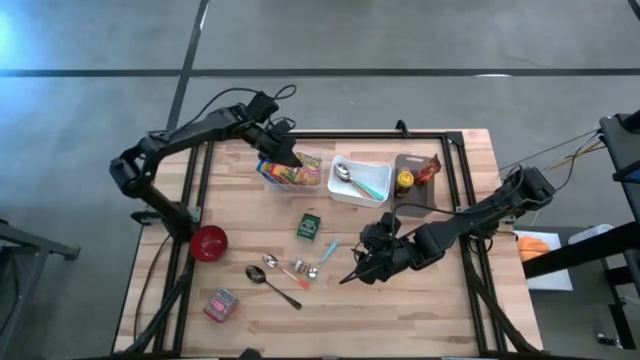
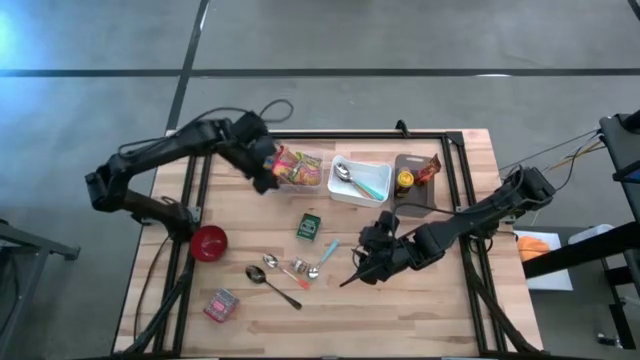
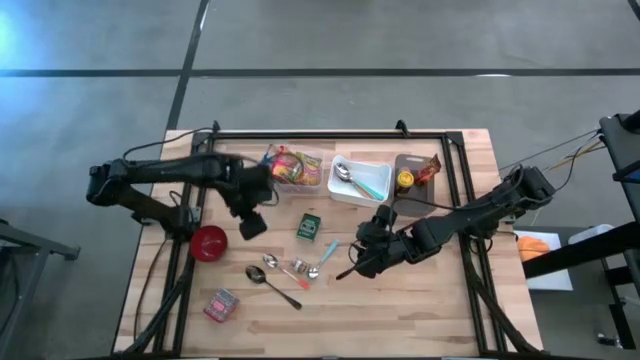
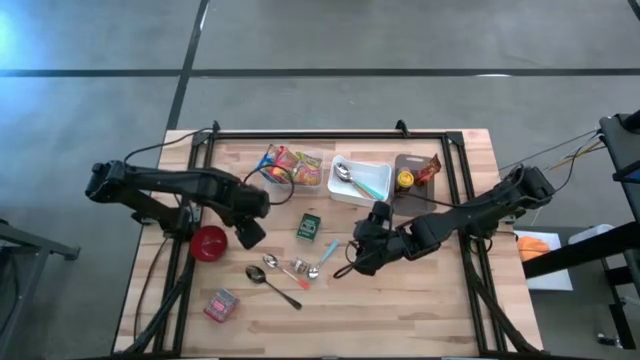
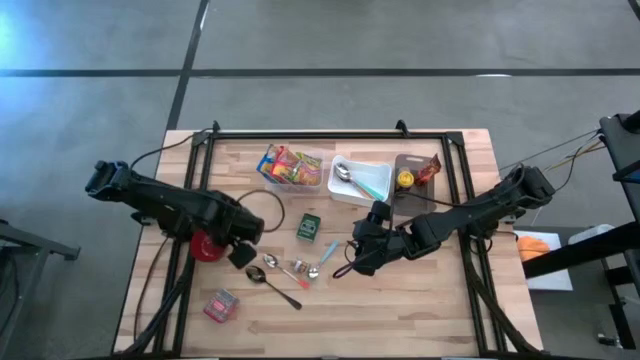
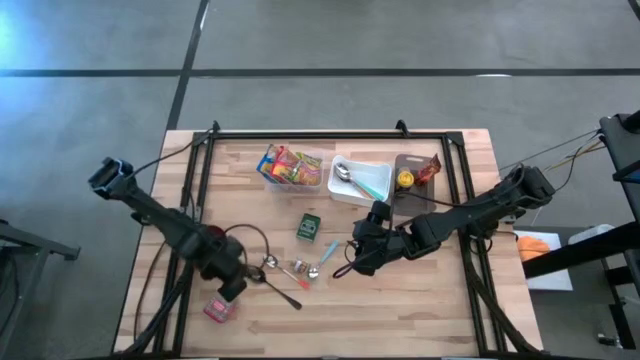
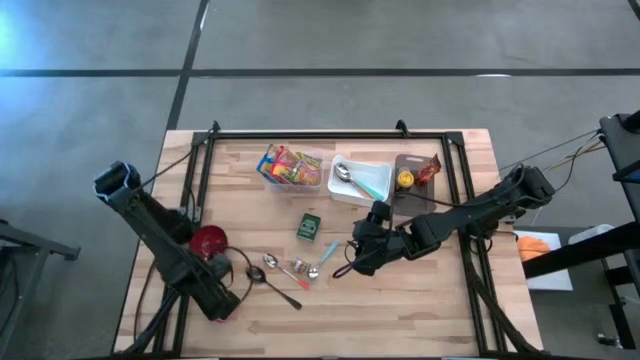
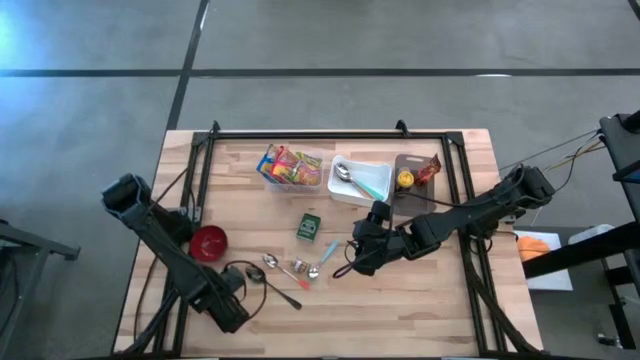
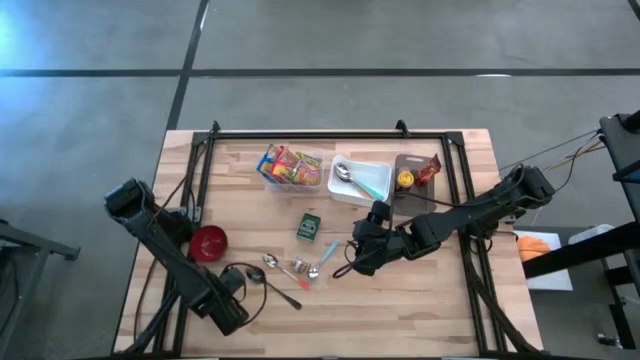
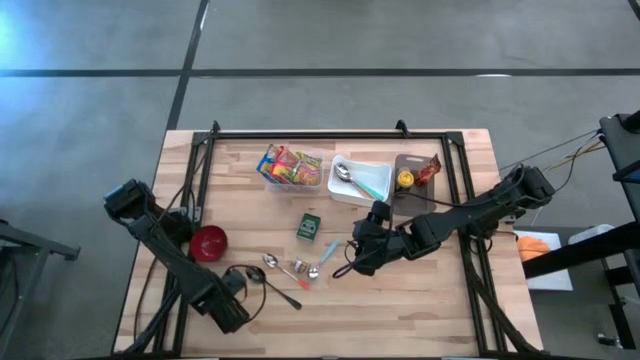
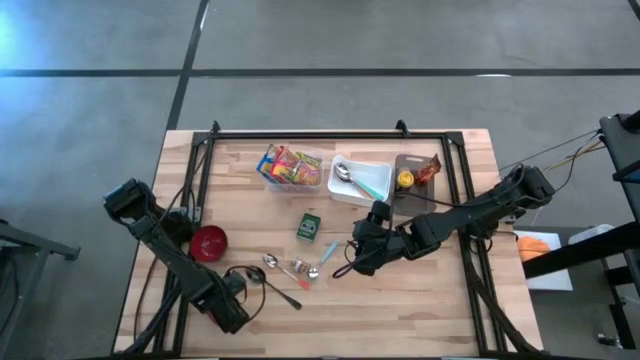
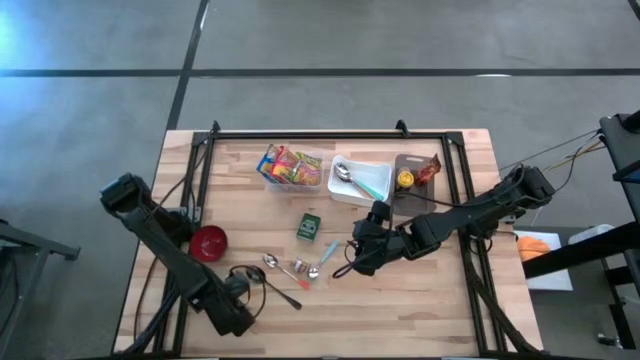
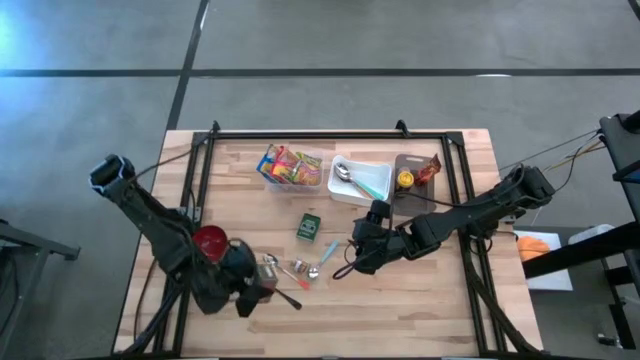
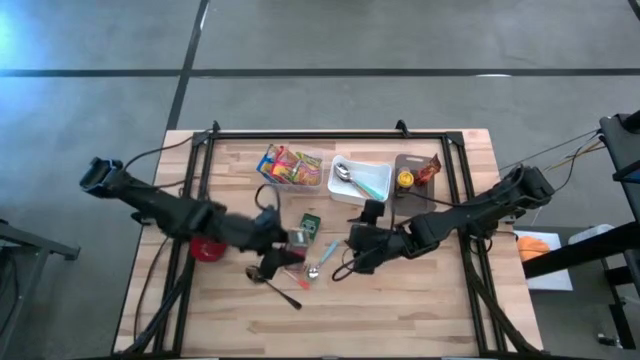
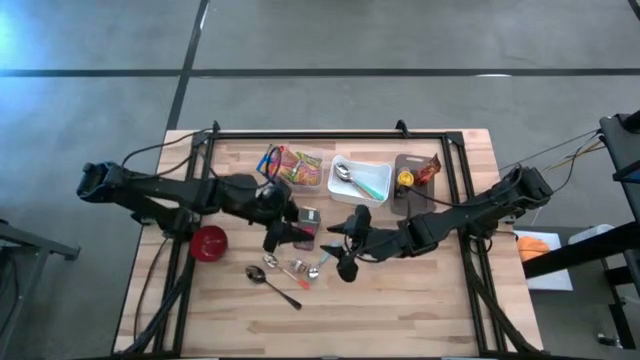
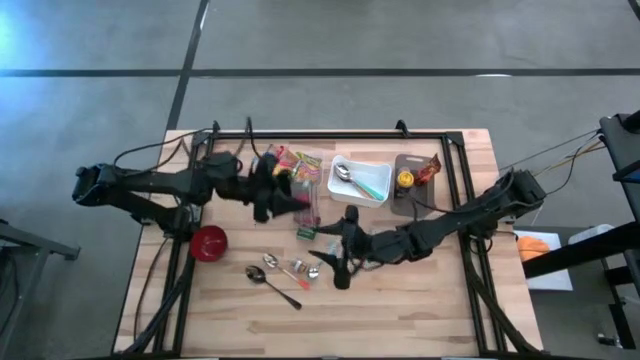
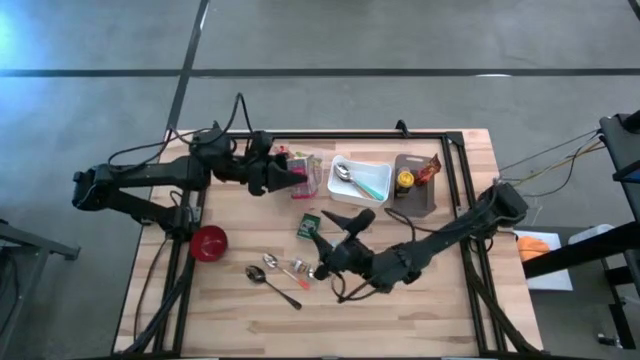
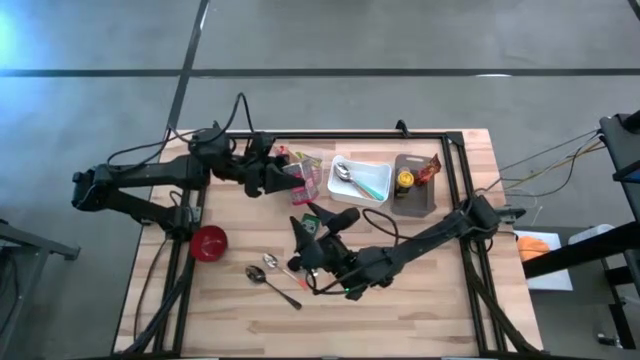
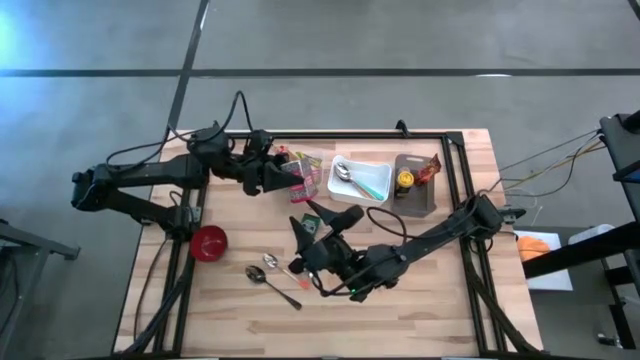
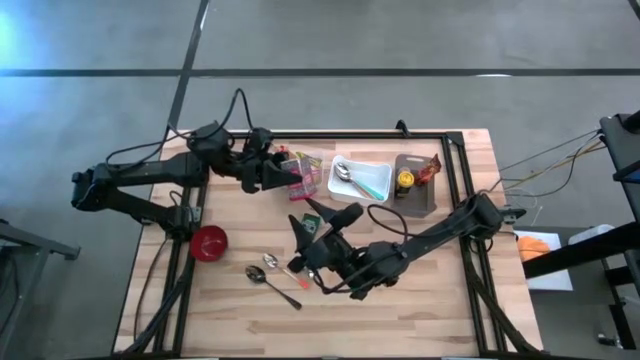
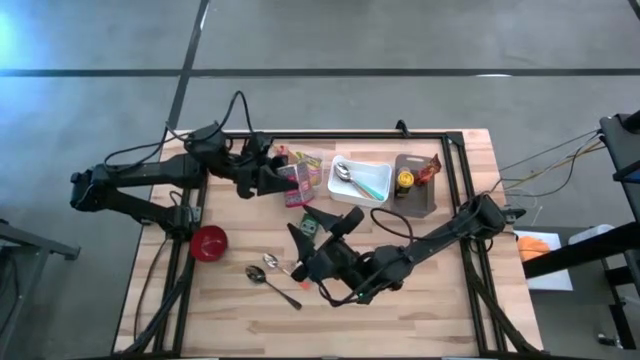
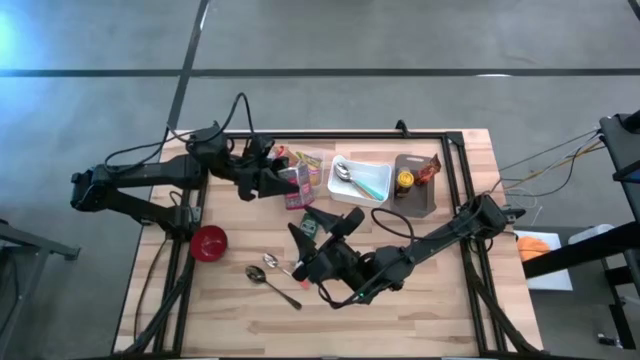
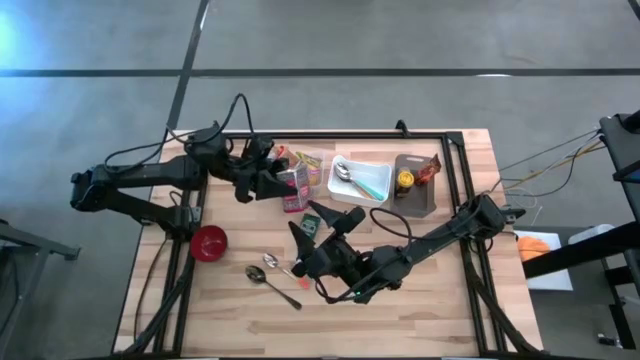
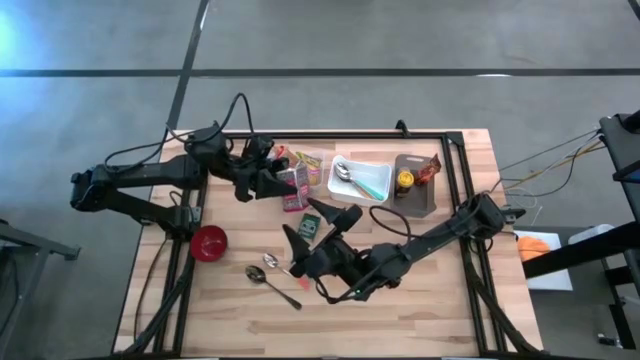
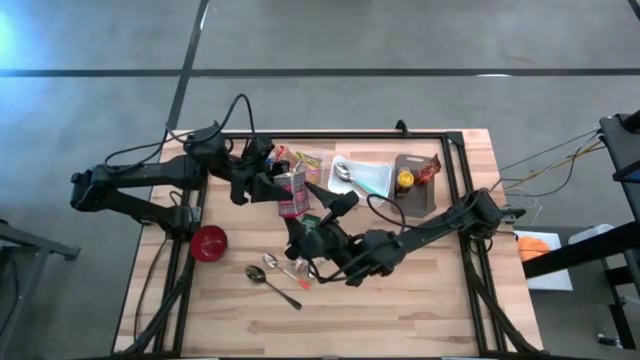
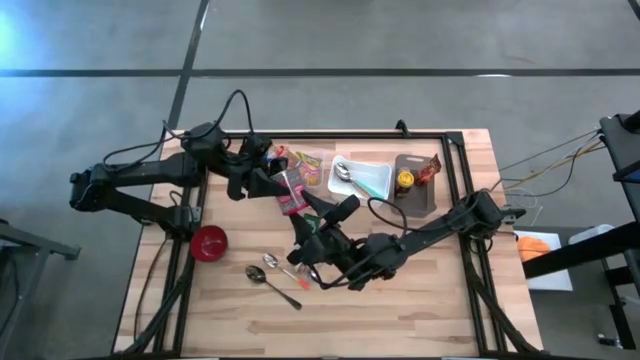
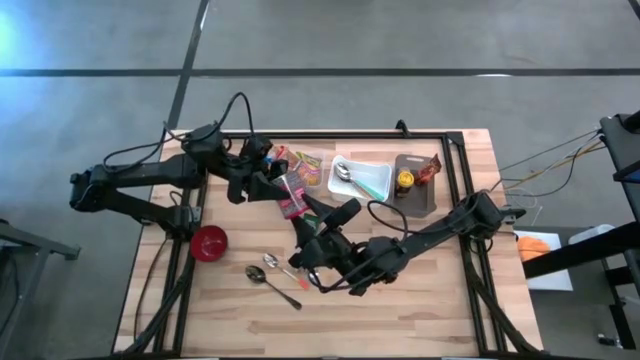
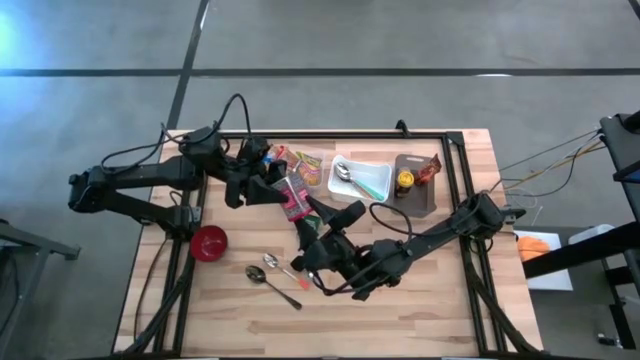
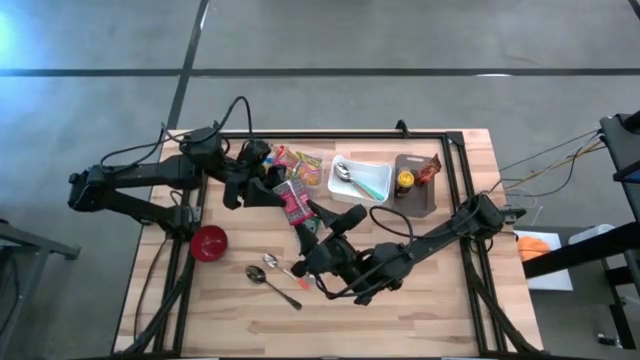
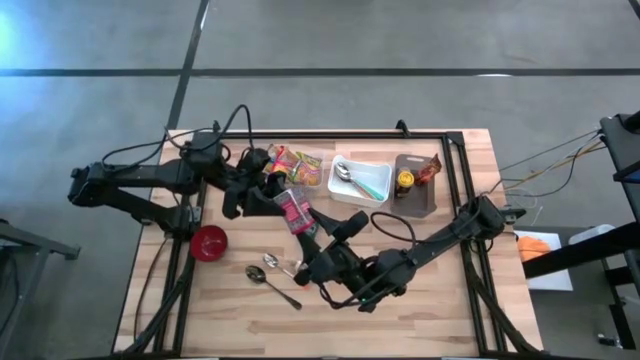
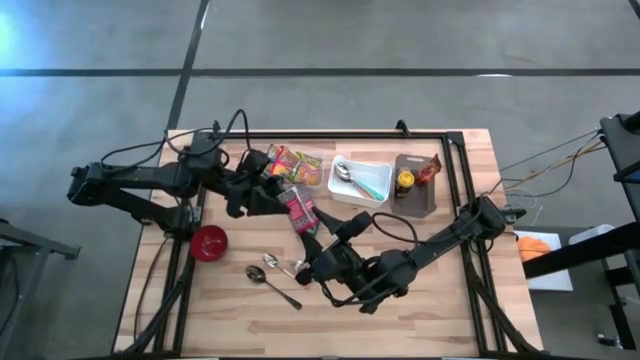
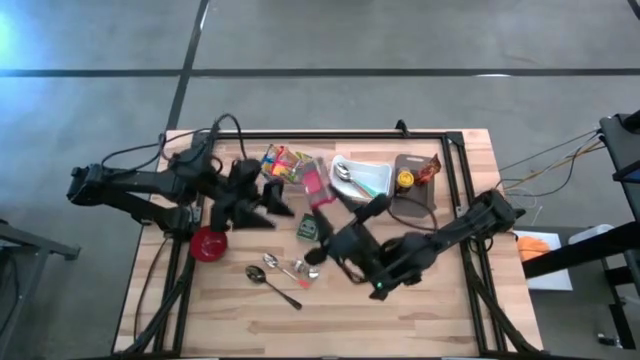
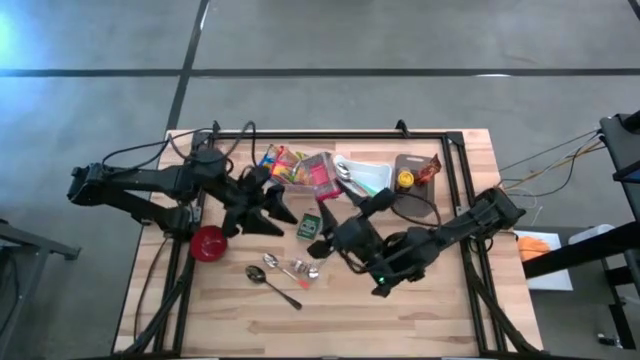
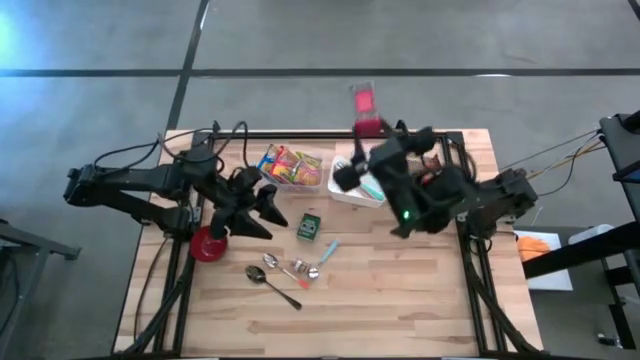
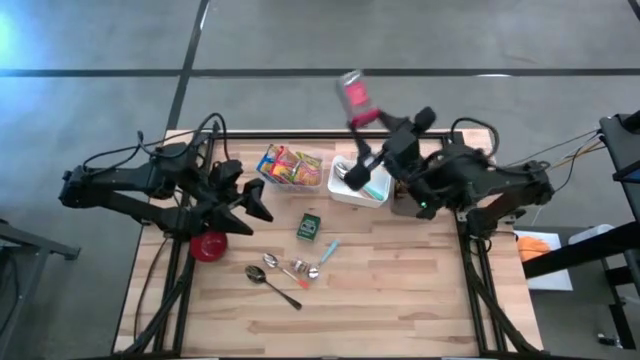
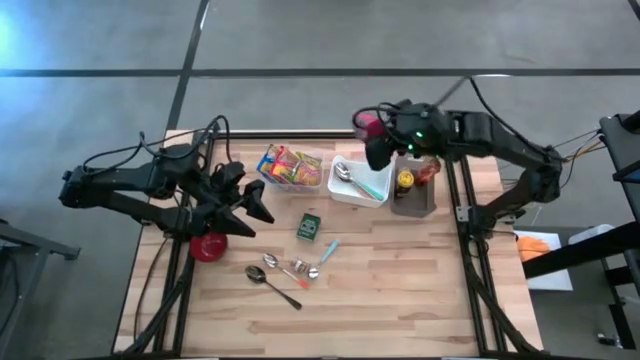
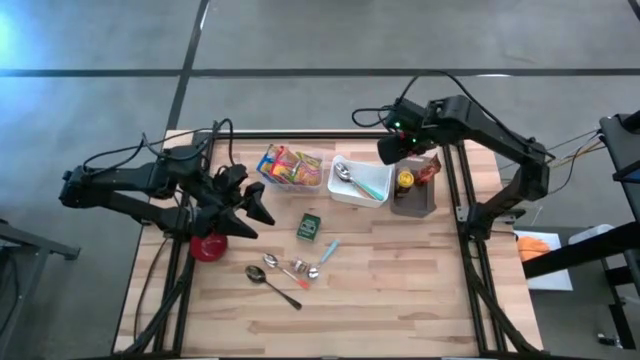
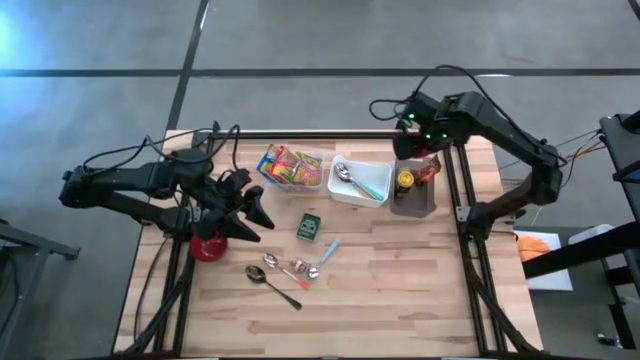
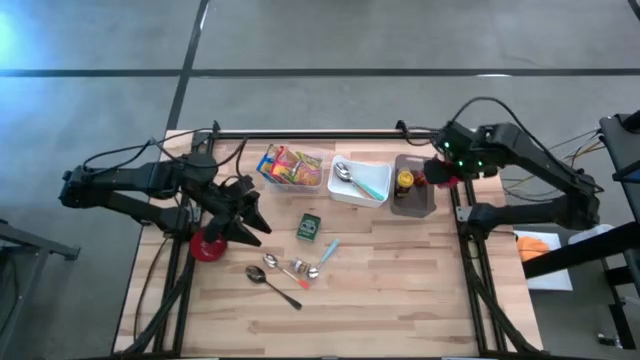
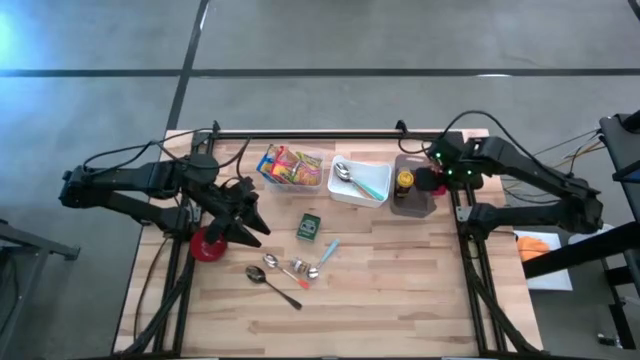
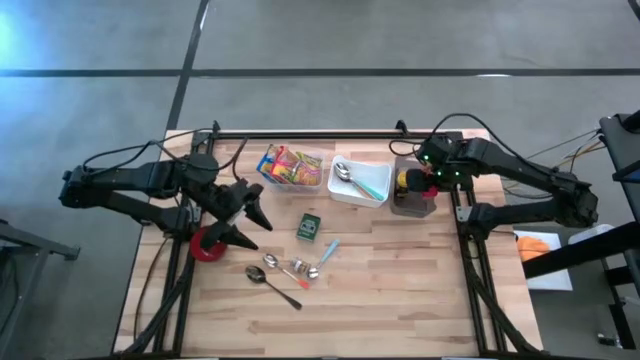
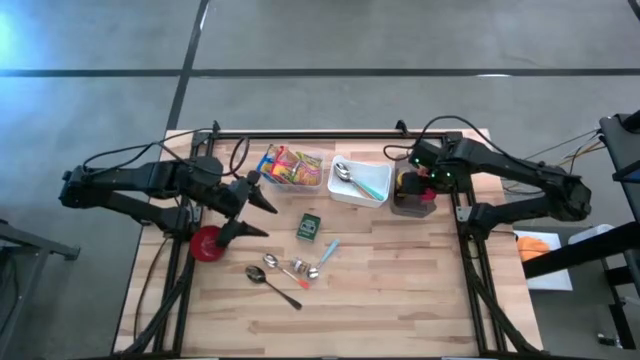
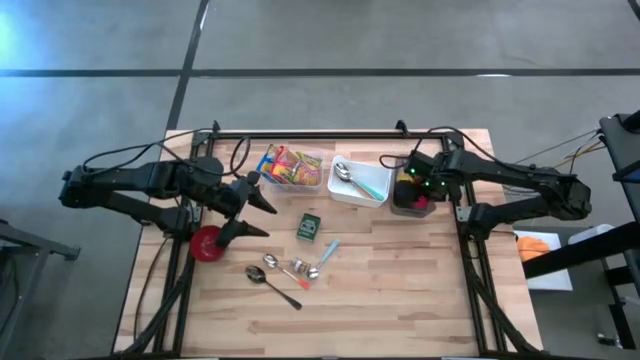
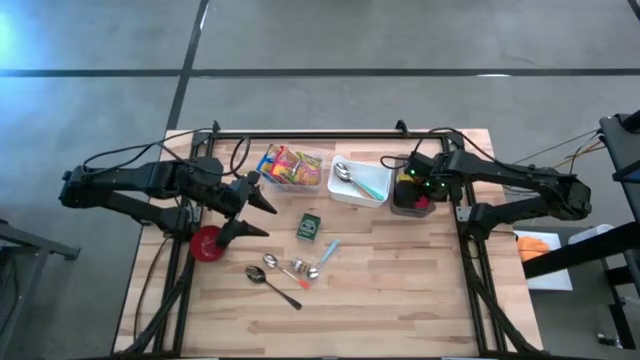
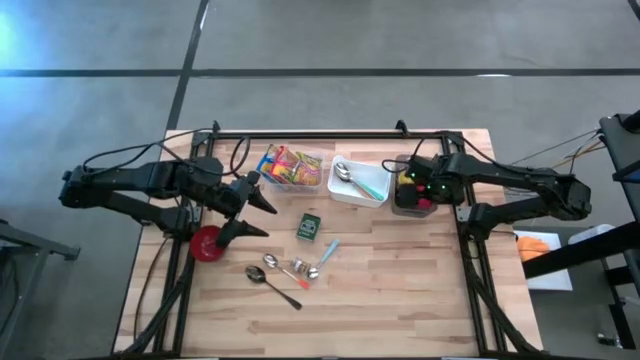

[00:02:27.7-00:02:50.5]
Put the red seasoning can into the black bin
